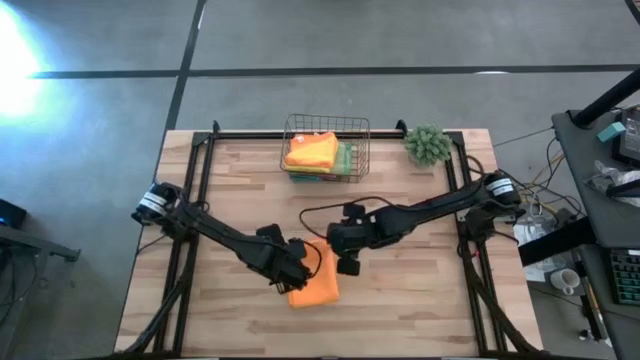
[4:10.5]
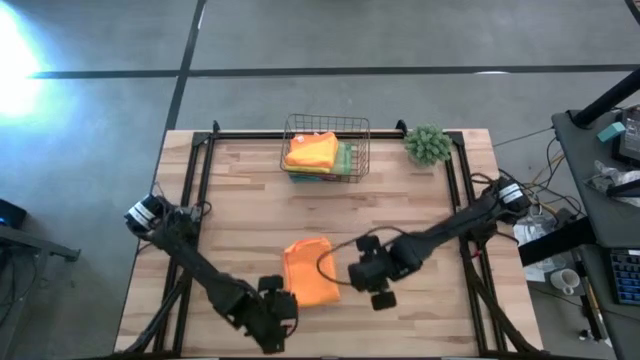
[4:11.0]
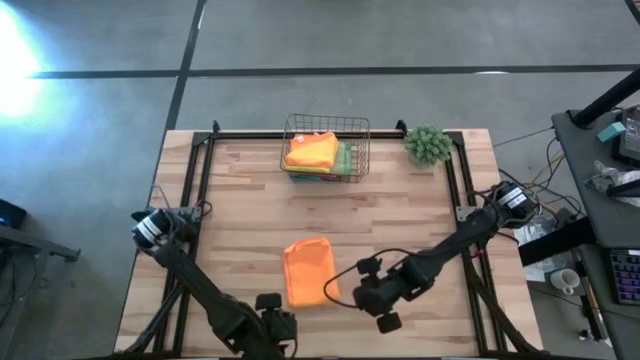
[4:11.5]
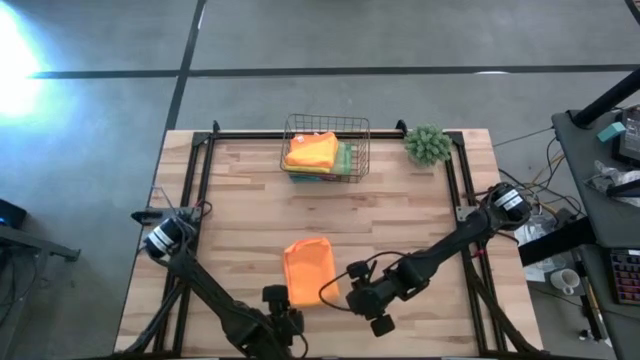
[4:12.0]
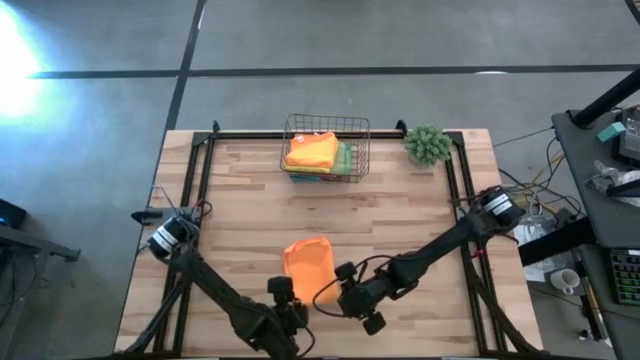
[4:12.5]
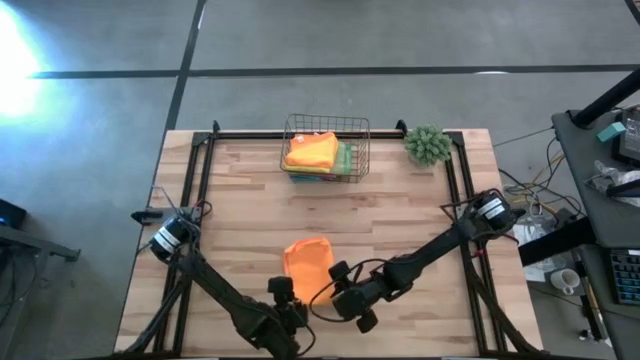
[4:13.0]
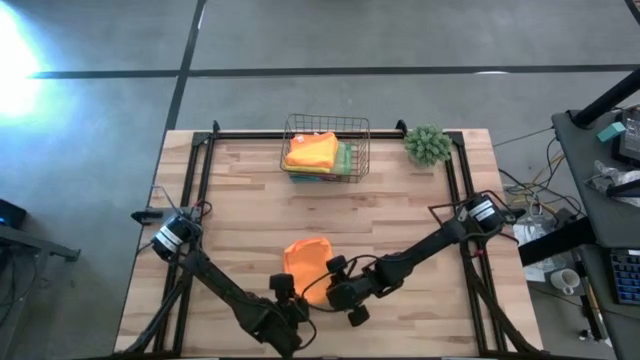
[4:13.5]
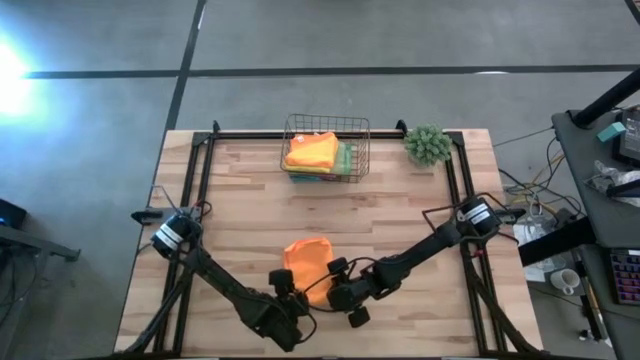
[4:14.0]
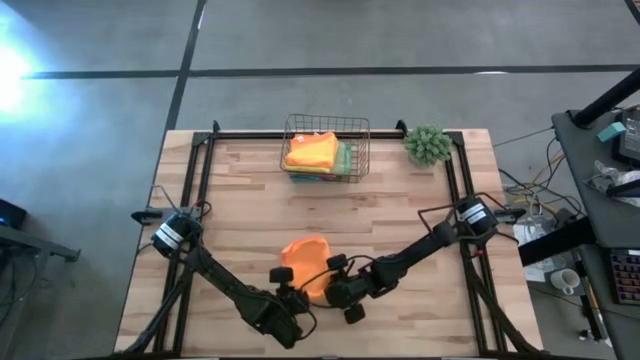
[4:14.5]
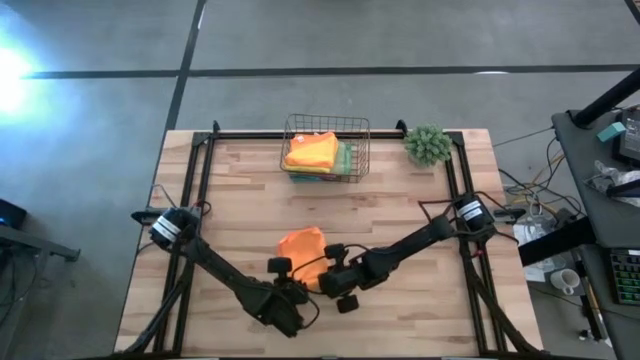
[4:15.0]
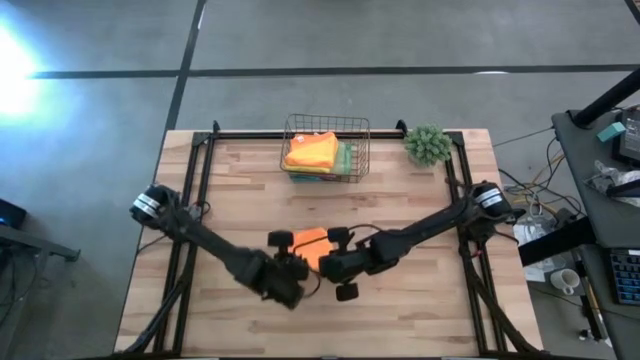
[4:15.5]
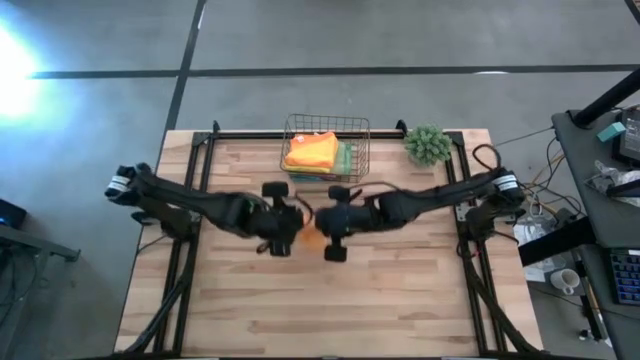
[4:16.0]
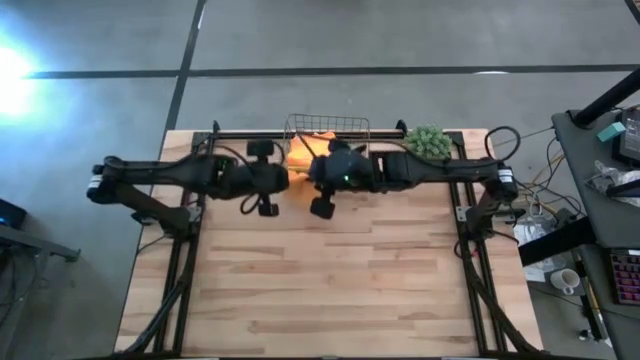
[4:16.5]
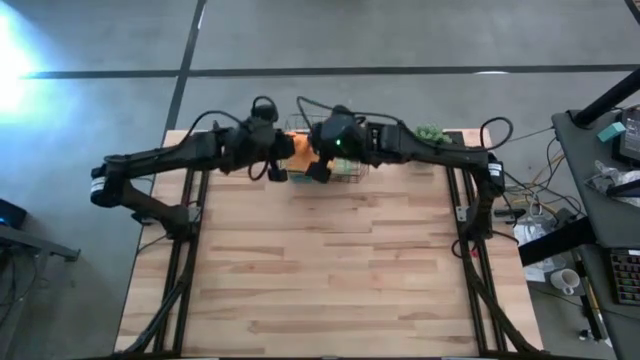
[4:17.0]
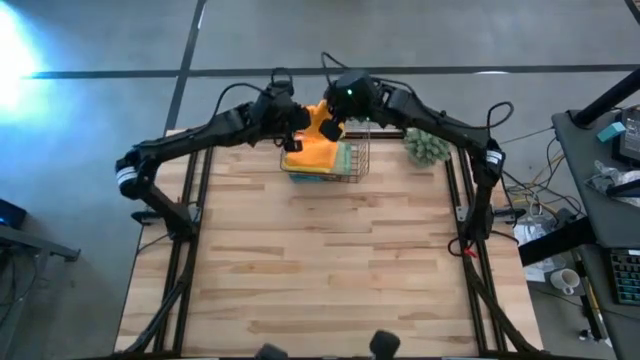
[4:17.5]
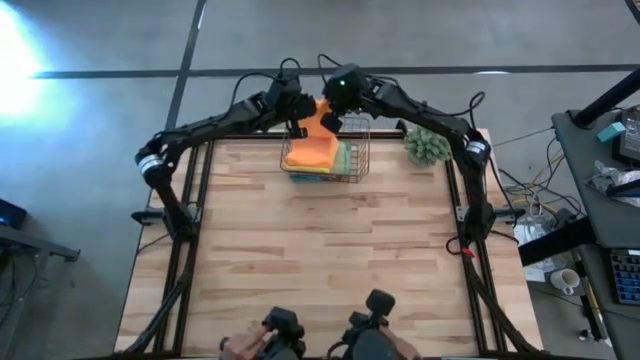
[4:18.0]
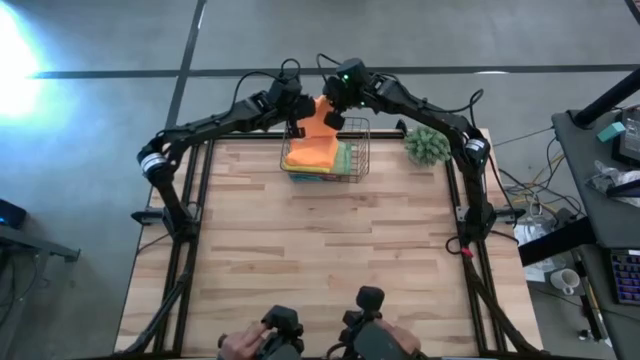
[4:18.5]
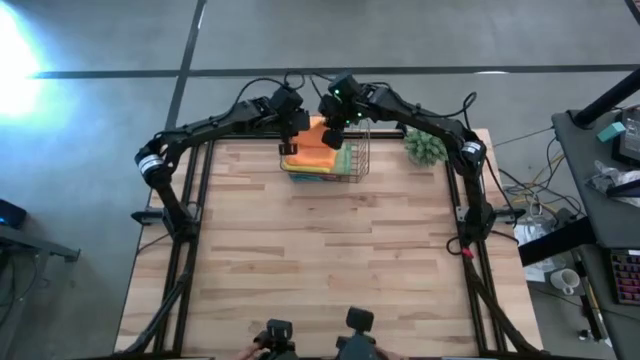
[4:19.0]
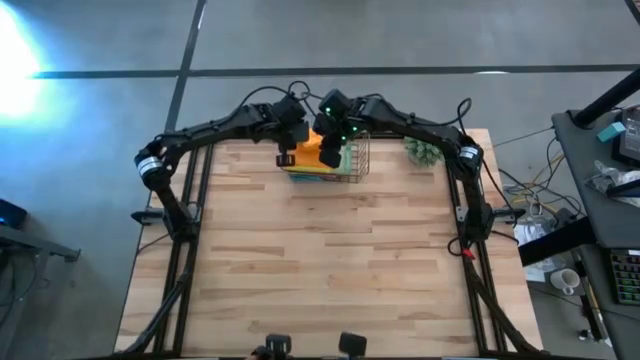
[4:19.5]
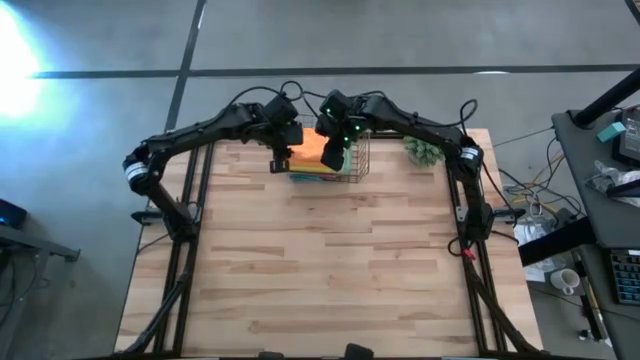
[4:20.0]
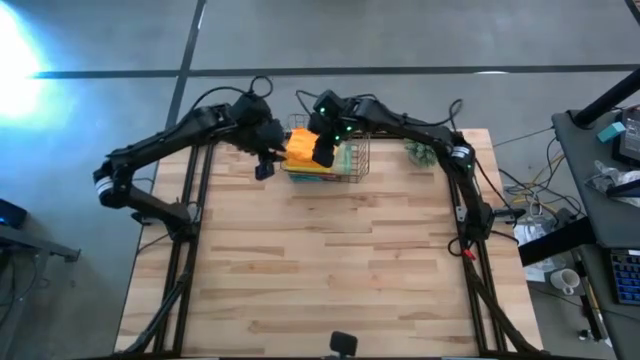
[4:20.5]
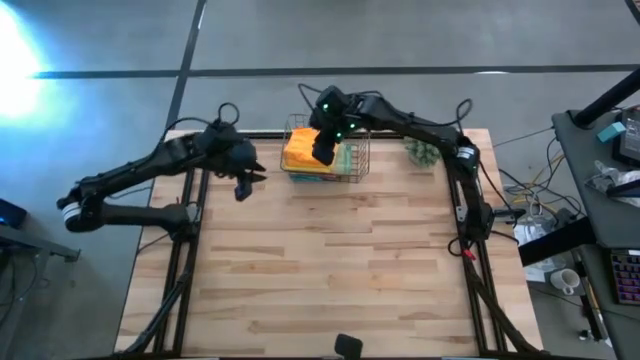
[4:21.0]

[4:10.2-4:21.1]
Task: Fold microfiber towels
Put the orange microfiber cloth into the wire basket

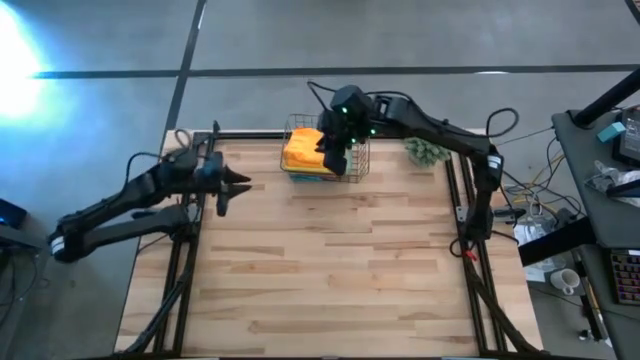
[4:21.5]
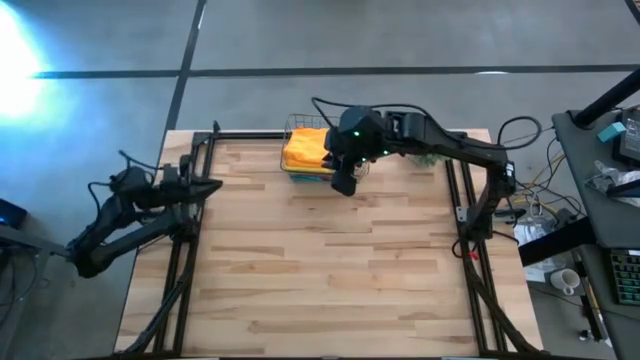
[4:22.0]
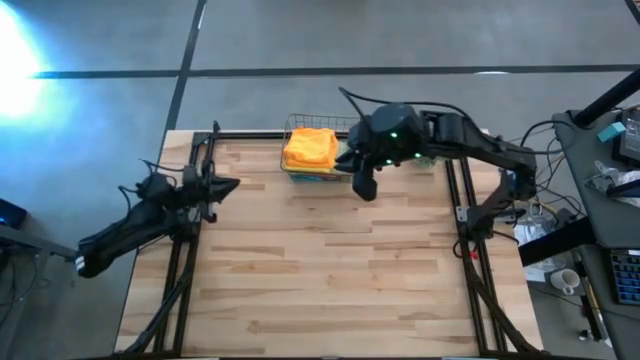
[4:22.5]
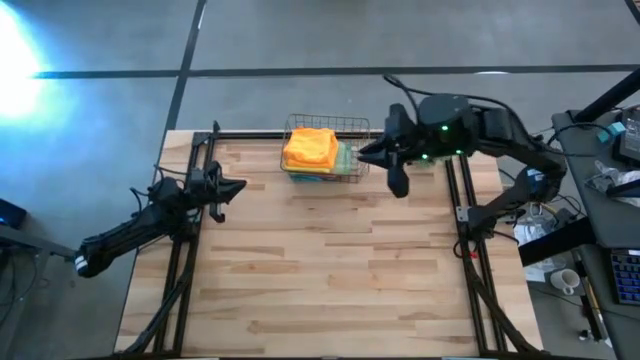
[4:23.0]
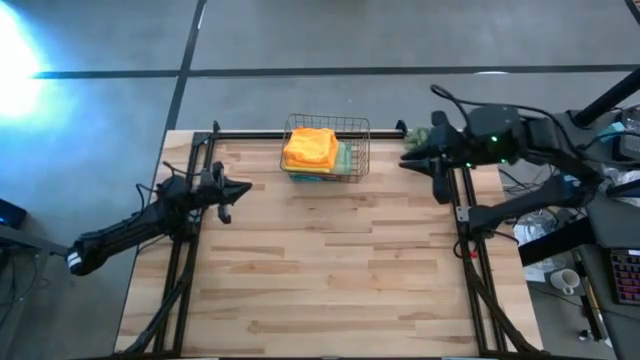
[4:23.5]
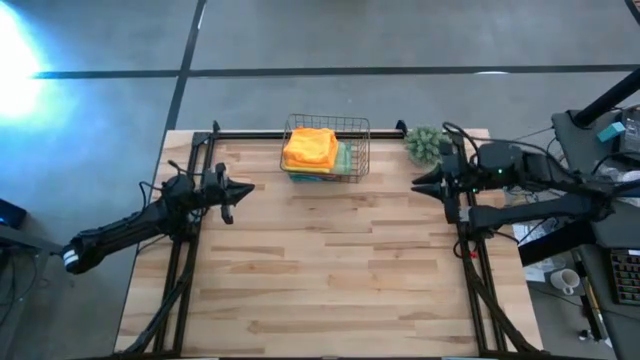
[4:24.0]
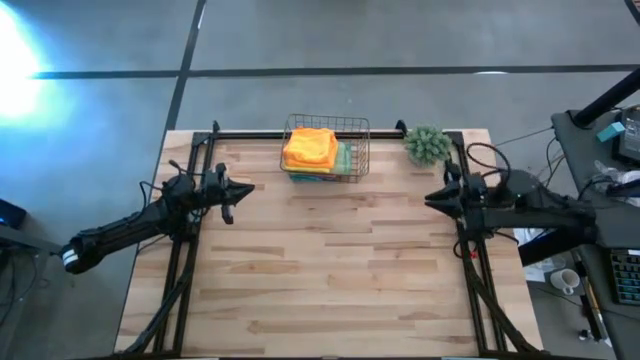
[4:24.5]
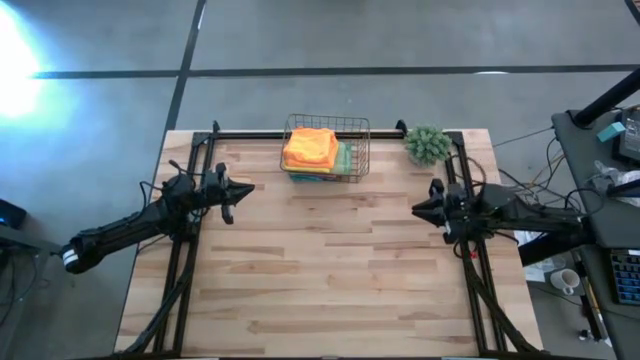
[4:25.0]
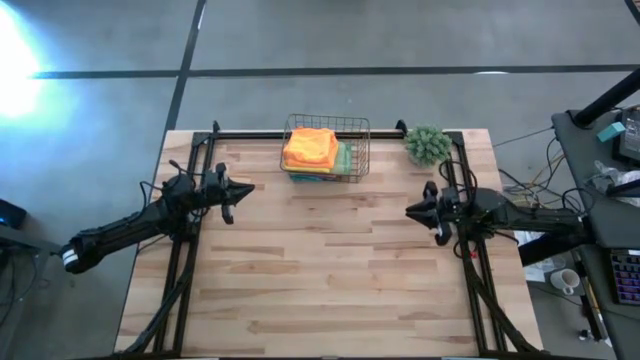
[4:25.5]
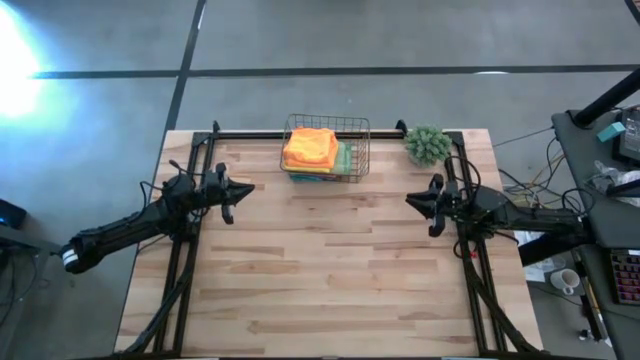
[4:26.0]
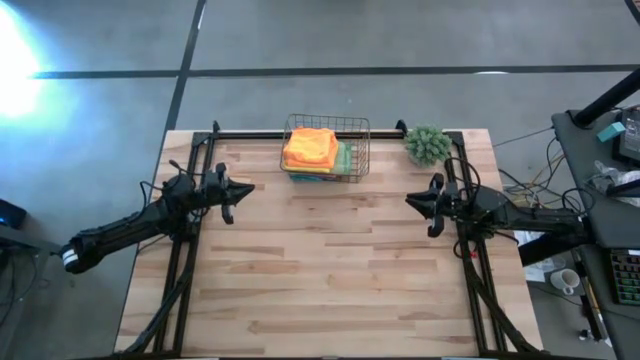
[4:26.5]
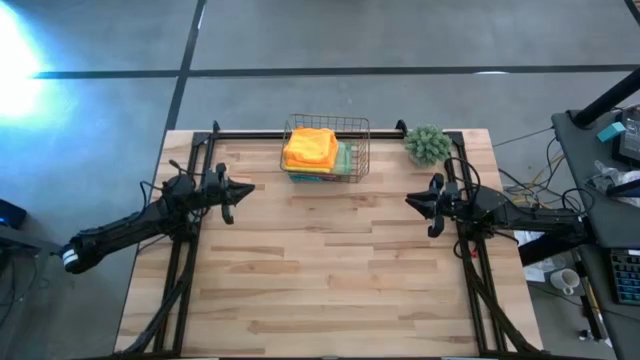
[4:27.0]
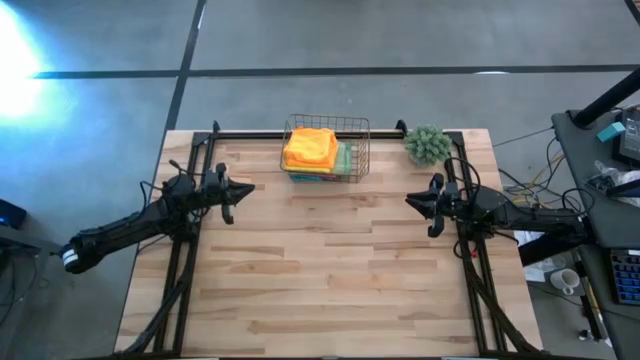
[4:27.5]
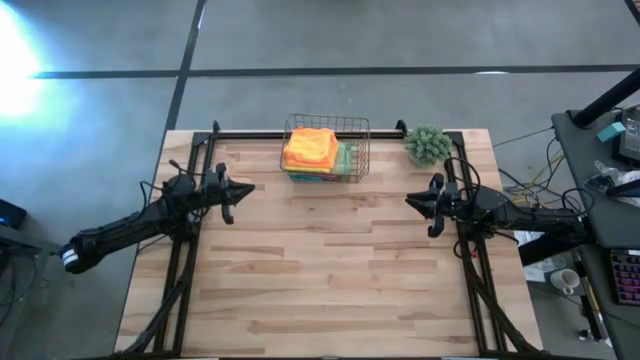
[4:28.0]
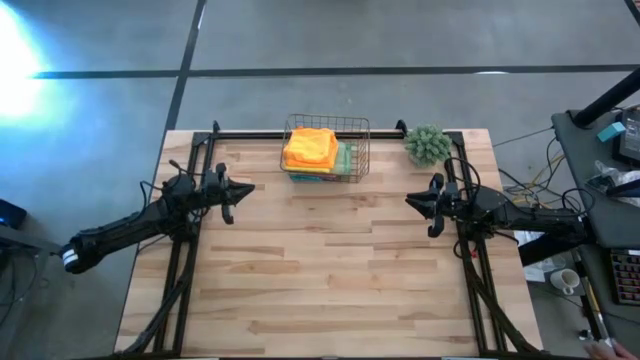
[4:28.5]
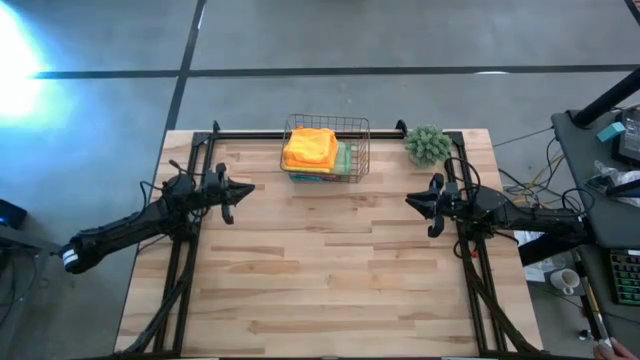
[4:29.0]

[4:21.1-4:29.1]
Return to Home Position

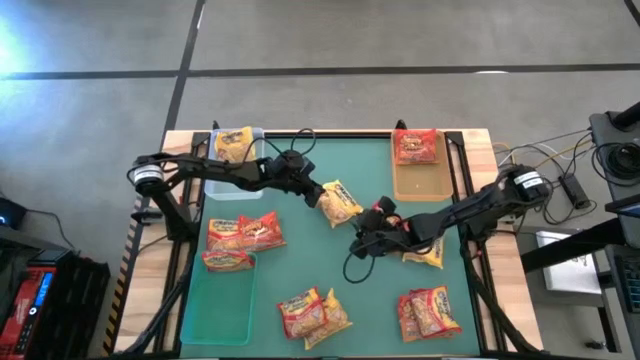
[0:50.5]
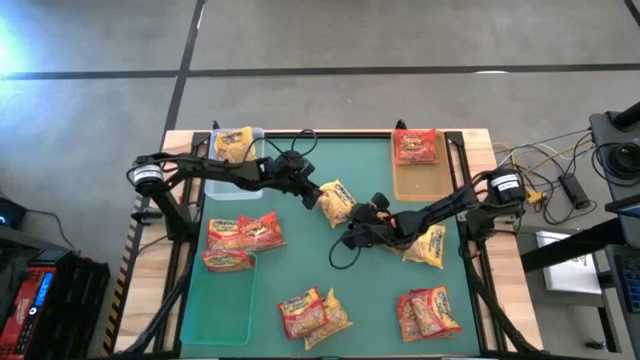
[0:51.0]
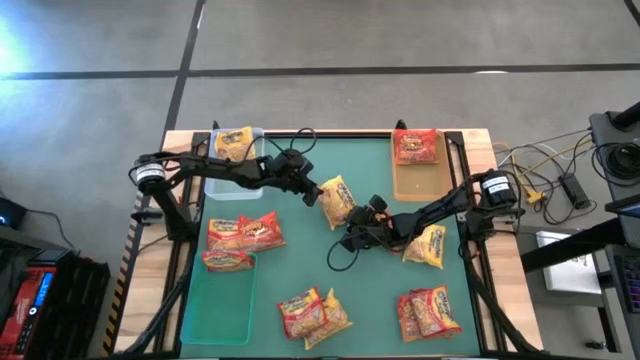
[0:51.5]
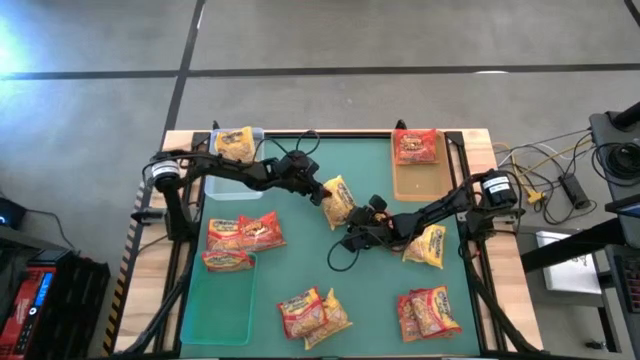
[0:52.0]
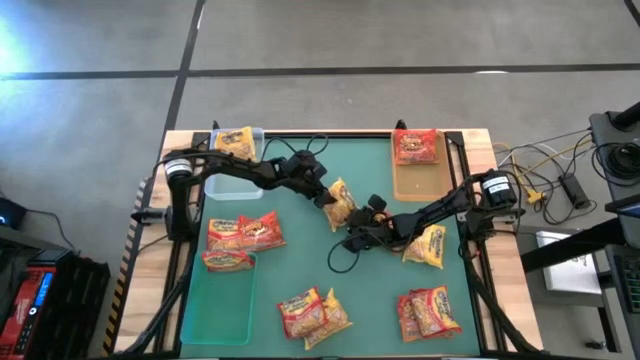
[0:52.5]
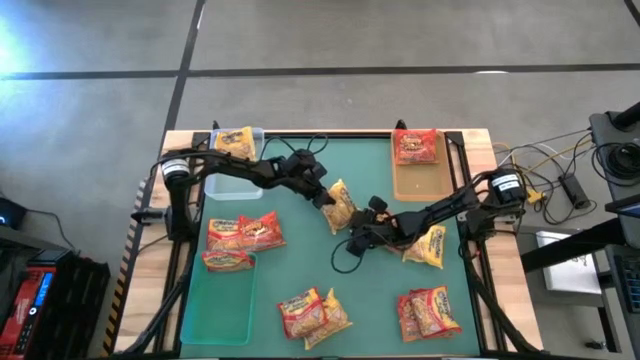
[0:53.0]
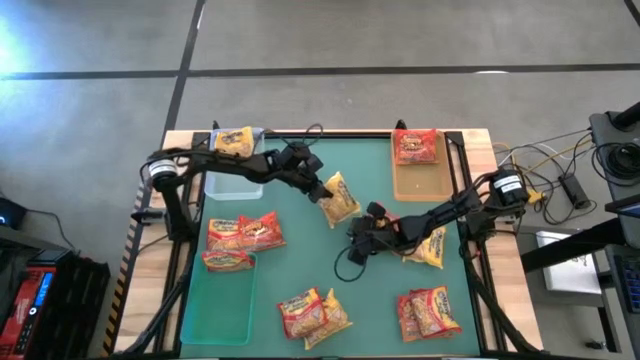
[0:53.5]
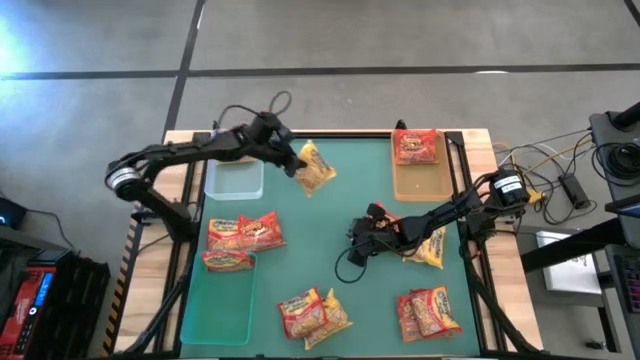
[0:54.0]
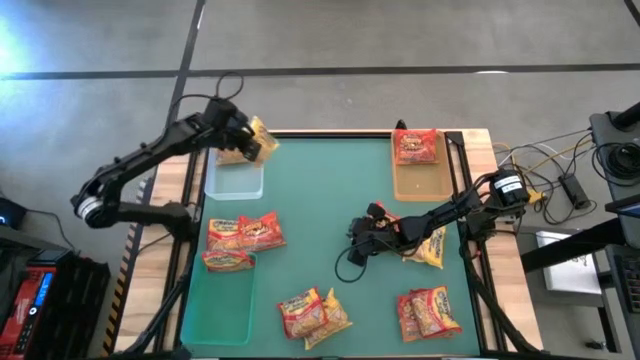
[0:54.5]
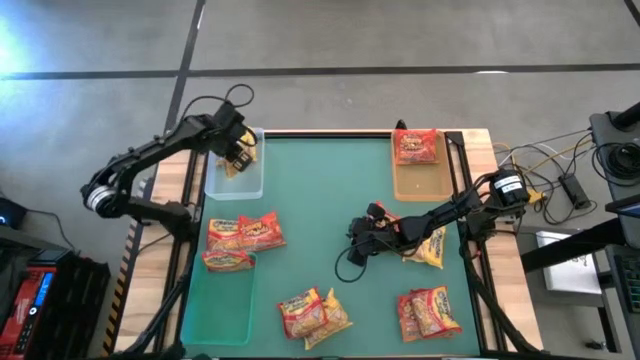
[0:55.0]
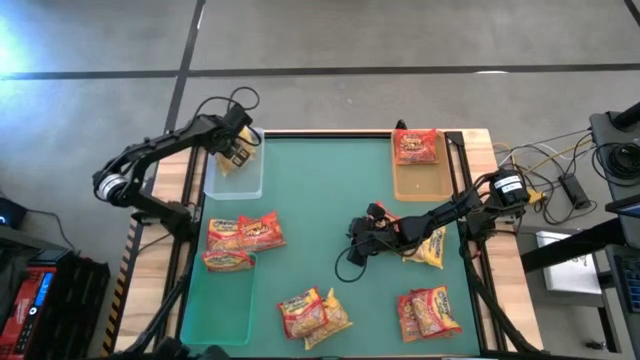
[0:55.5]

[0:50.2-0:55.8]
Task: Sort Maruchan noodles
Put the yellow noodle pack into the transparent bin
